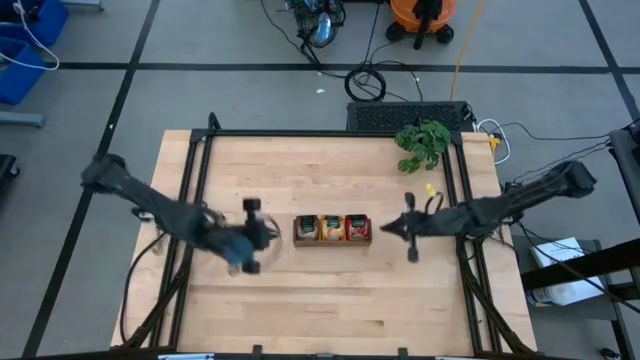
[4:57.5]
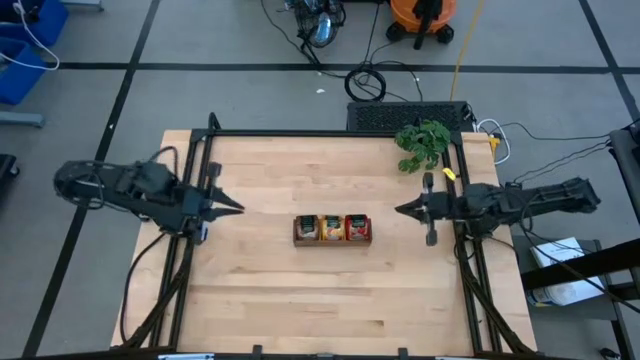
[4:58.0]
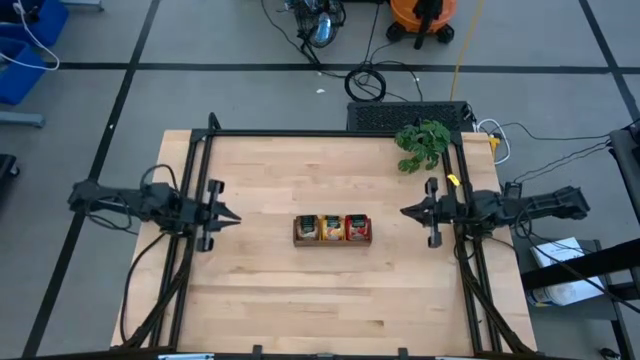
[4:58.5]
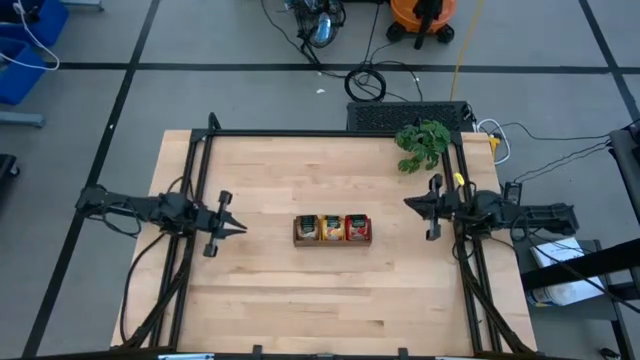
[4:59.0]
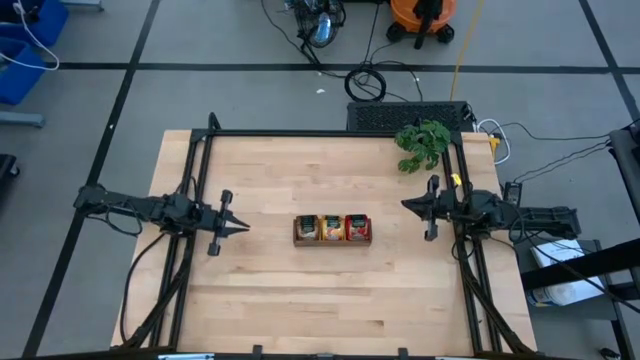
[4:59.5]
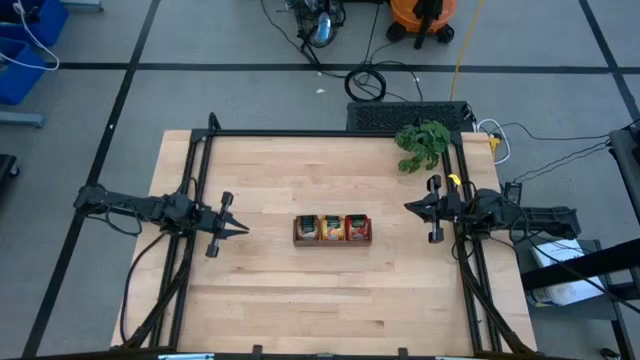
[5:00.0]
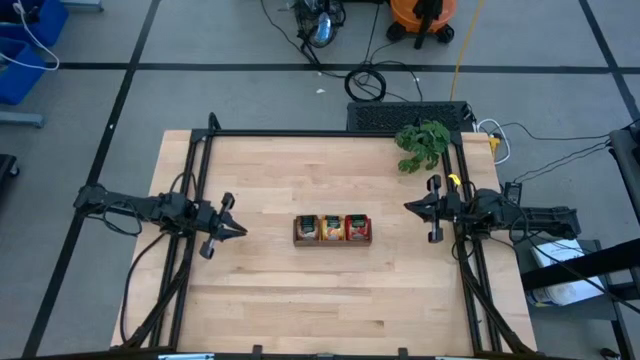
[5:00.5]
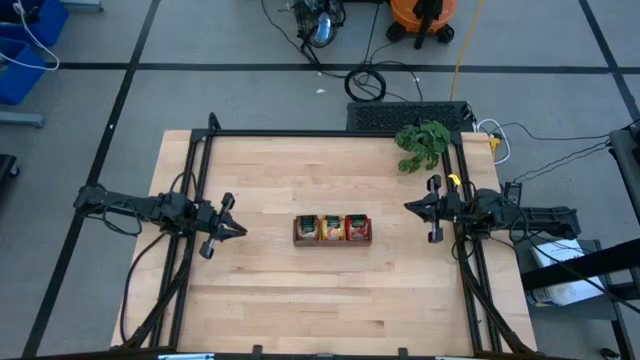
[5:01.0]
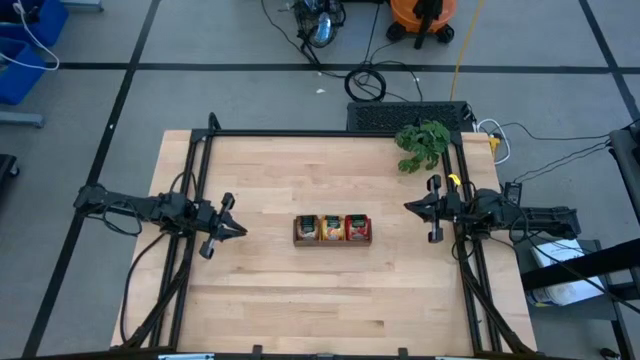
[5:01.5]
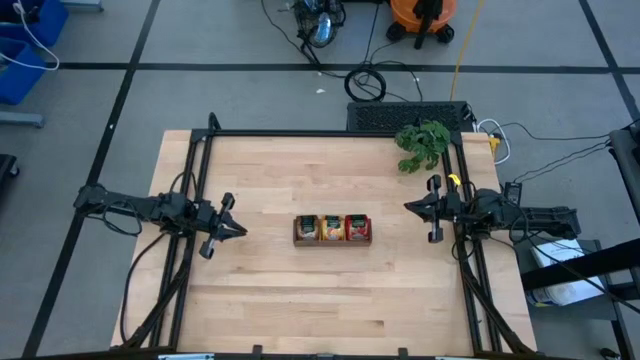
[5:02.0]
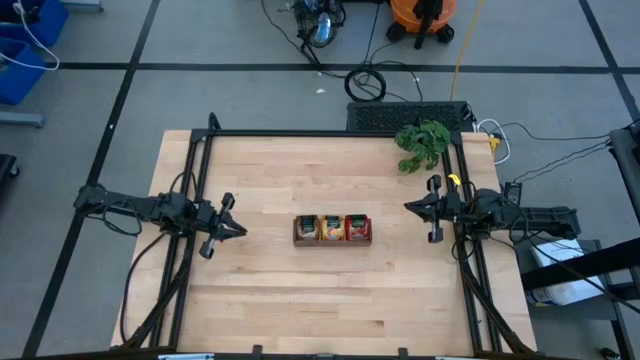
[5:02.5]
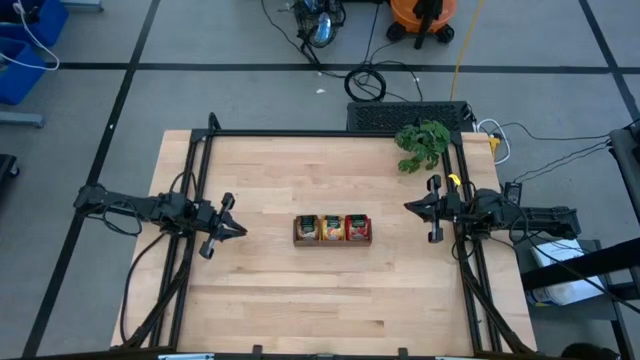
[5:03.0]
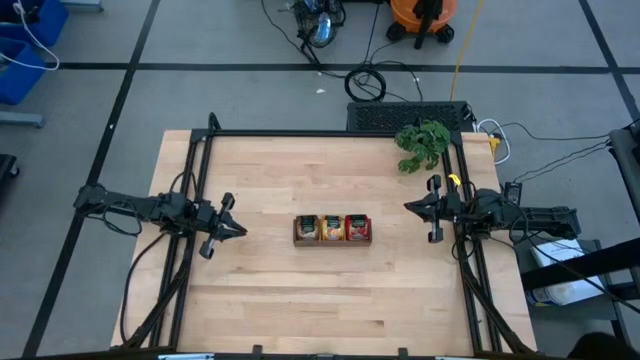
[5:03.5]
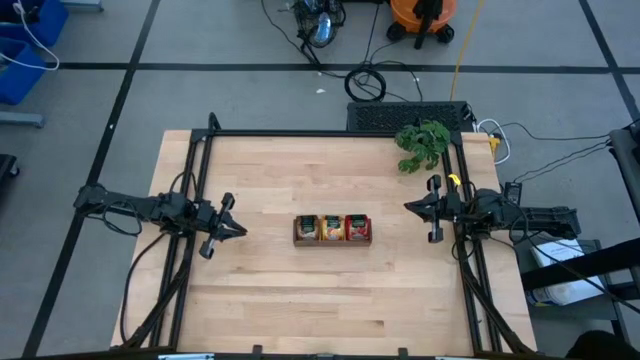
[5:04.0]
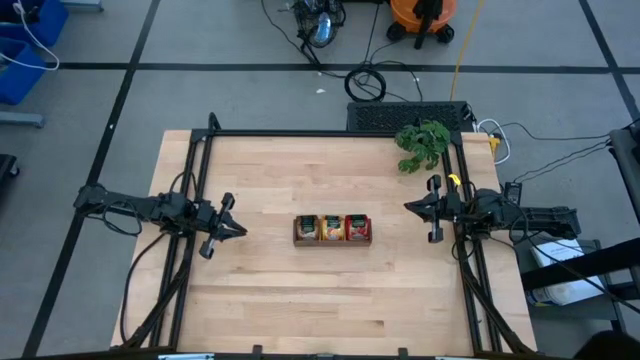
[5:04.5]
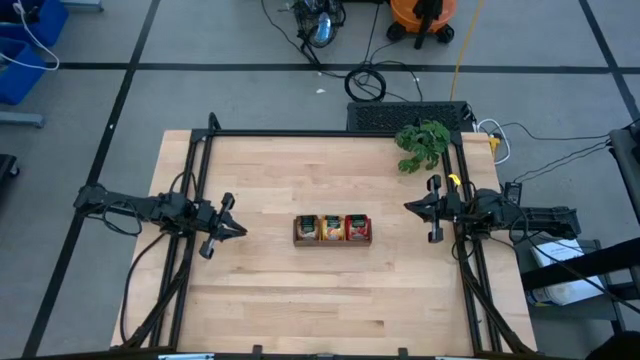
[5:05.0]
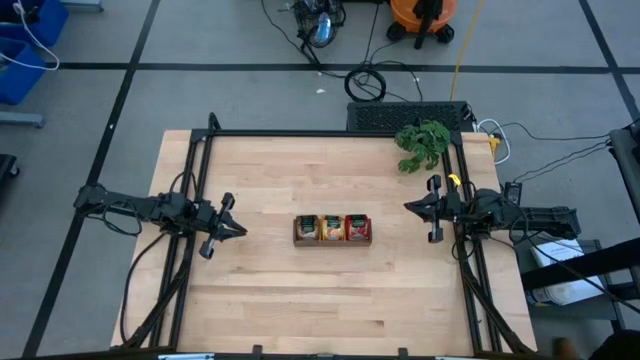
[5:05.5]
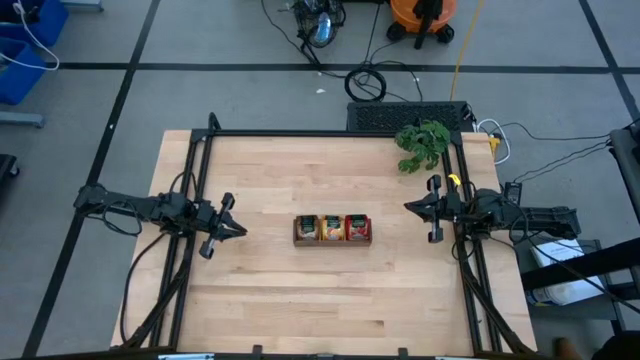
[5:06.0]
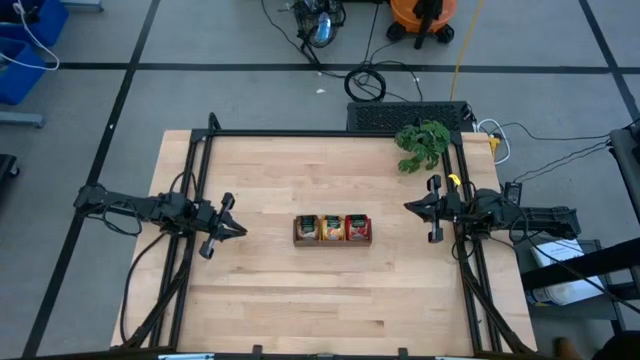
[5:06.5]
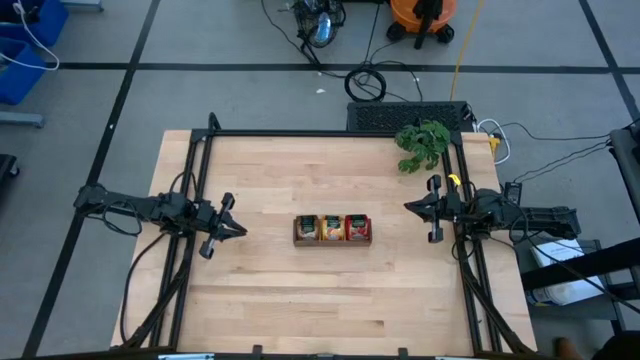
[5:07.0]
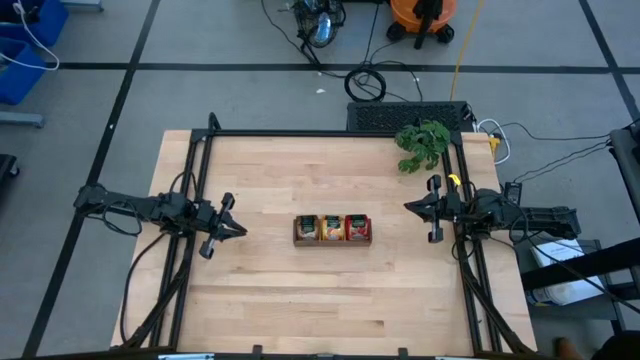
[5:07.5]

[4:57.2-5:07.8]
Task: Pick & Place Tea
Return to Home Position

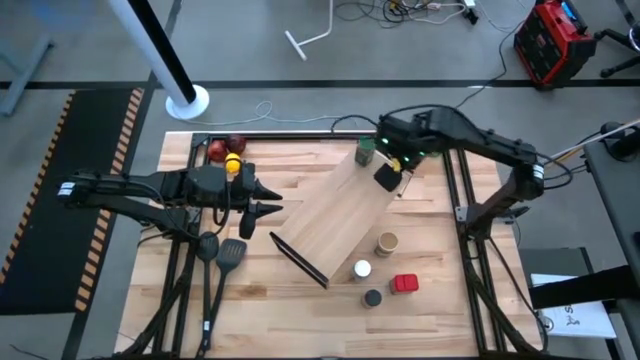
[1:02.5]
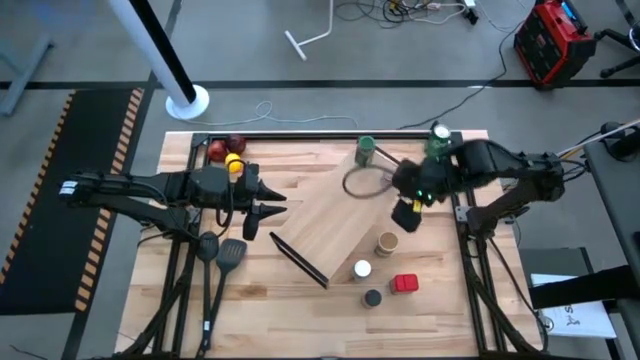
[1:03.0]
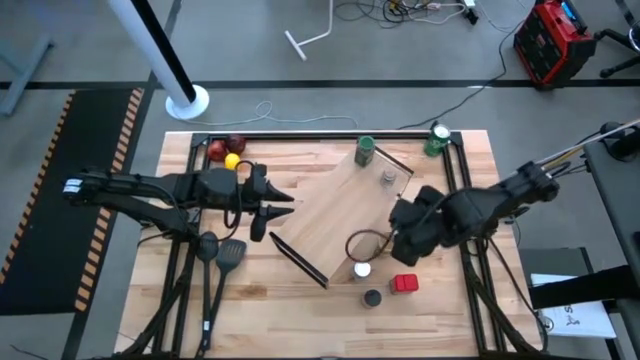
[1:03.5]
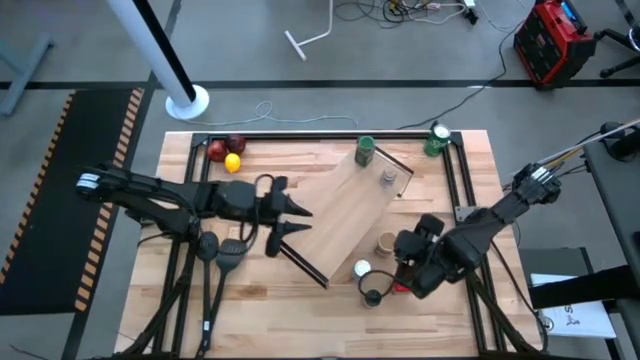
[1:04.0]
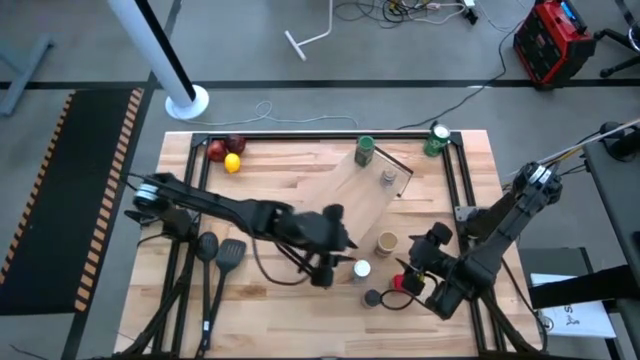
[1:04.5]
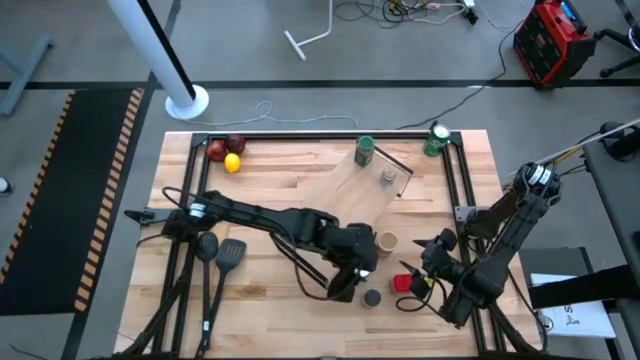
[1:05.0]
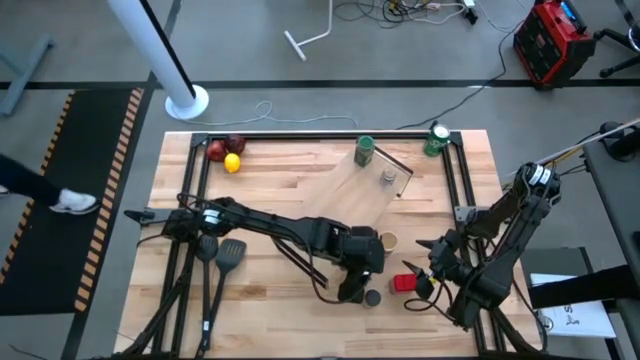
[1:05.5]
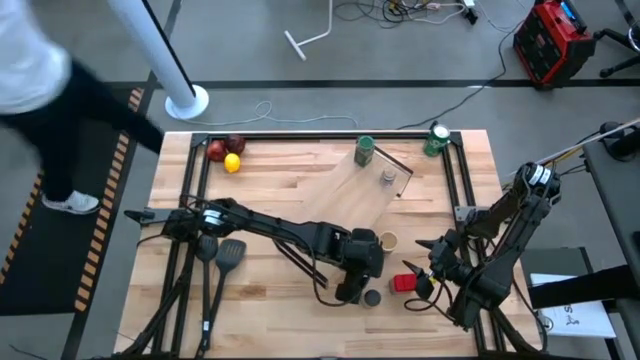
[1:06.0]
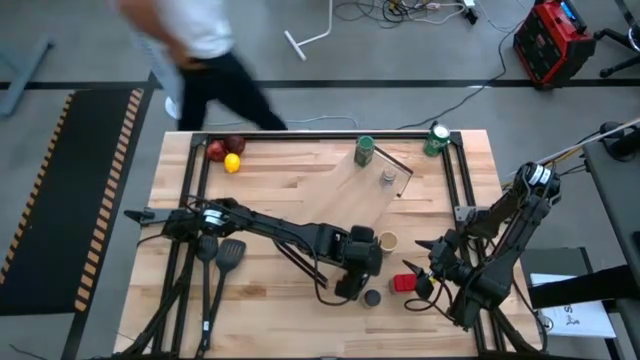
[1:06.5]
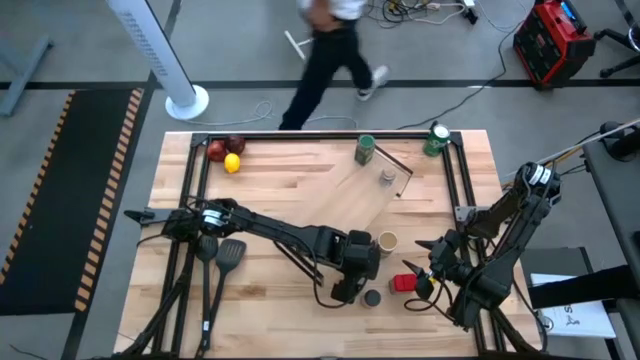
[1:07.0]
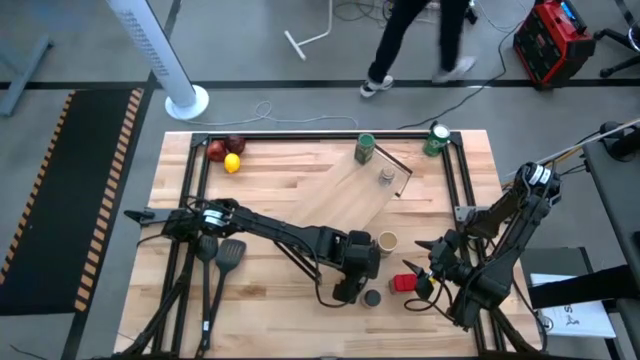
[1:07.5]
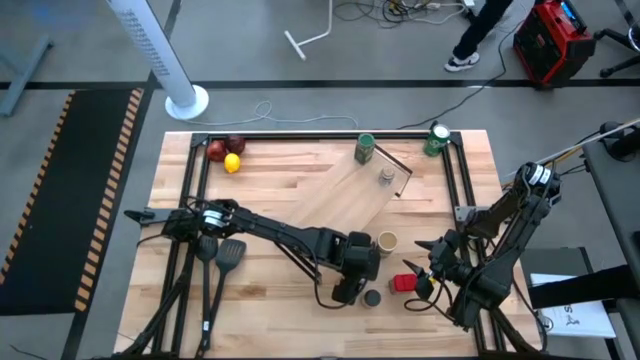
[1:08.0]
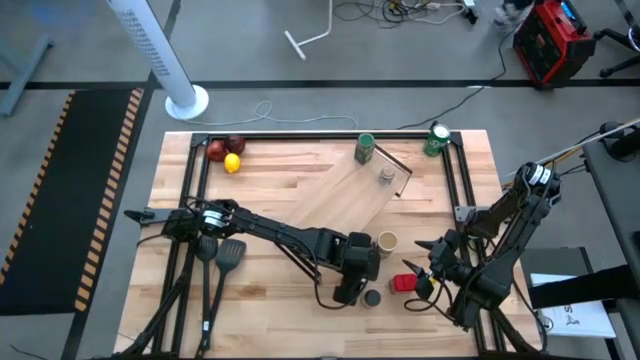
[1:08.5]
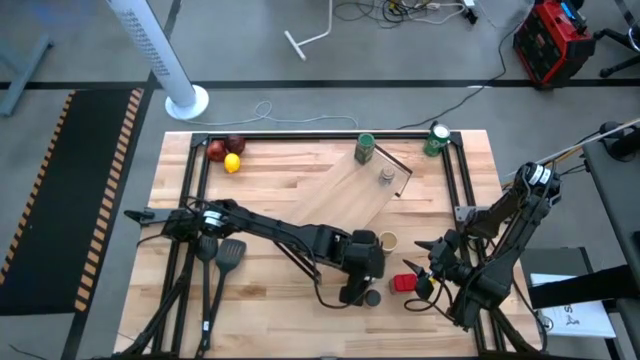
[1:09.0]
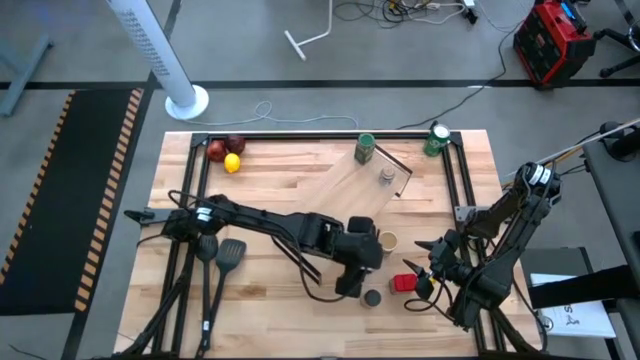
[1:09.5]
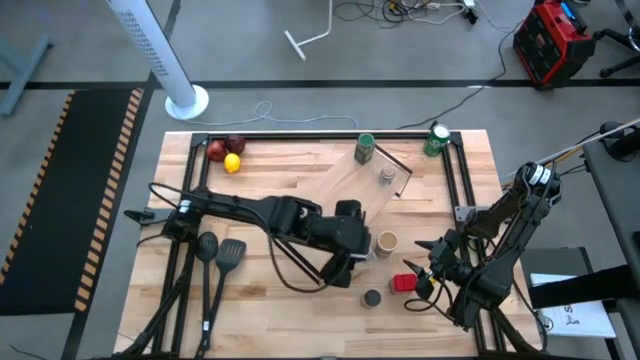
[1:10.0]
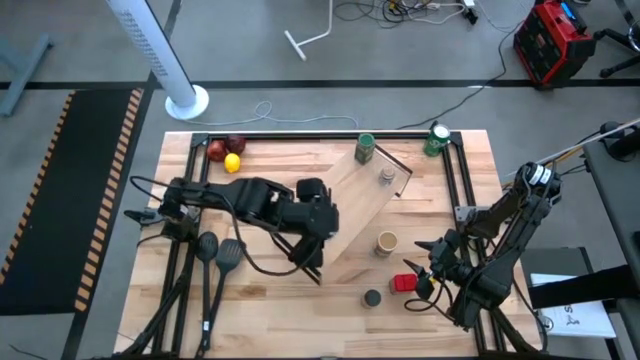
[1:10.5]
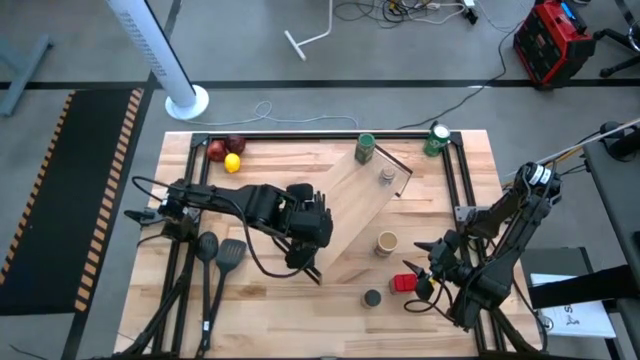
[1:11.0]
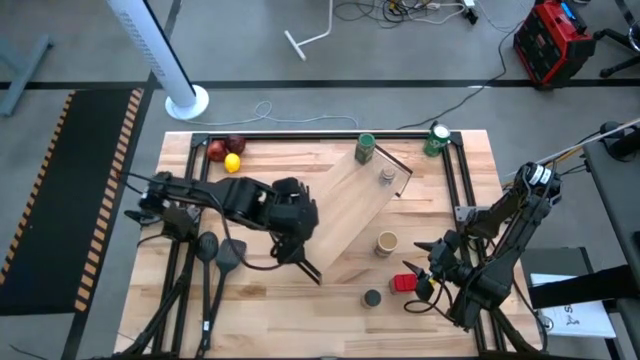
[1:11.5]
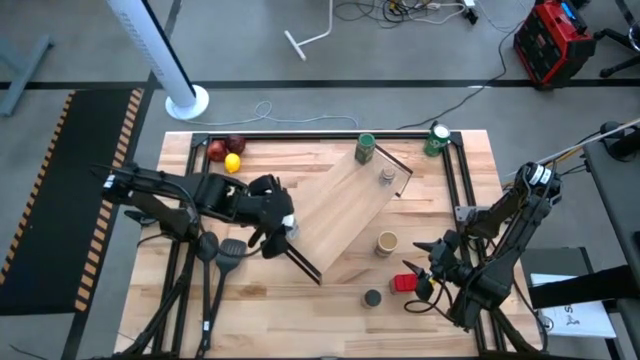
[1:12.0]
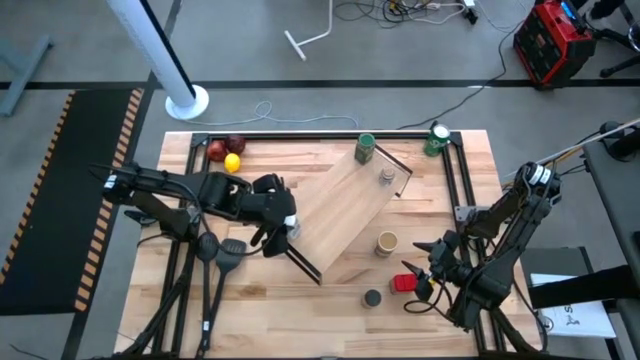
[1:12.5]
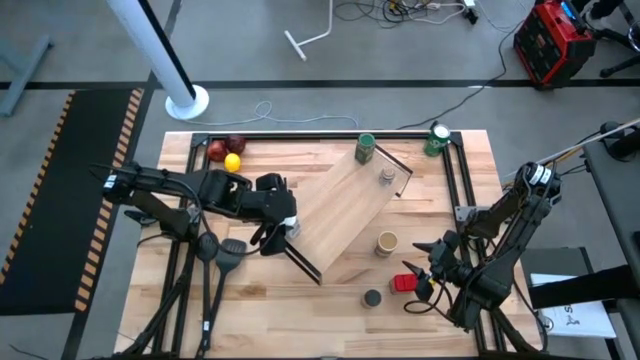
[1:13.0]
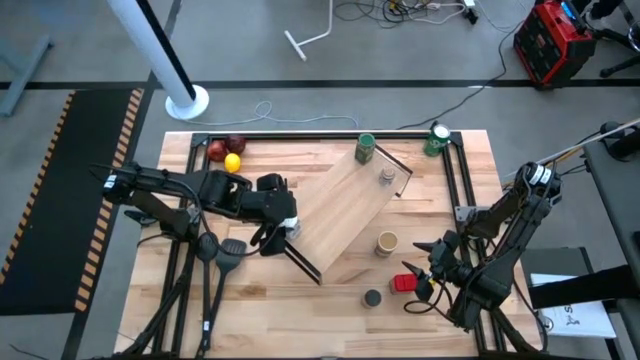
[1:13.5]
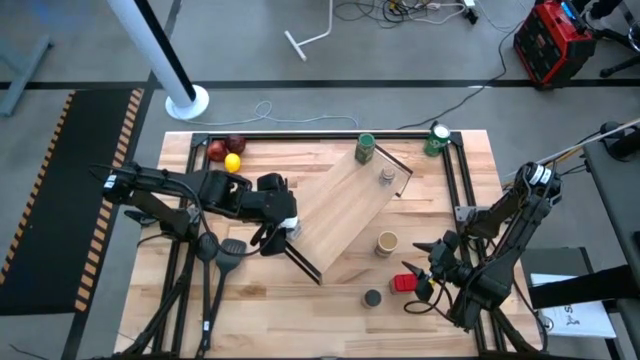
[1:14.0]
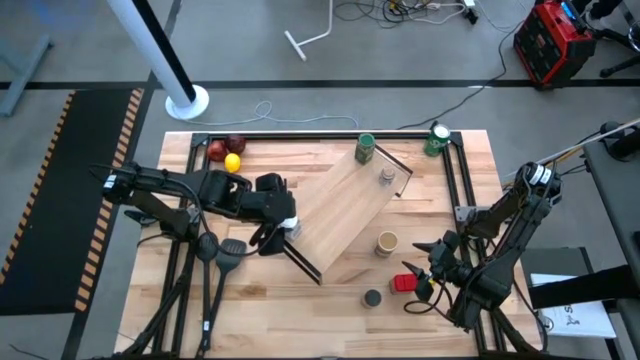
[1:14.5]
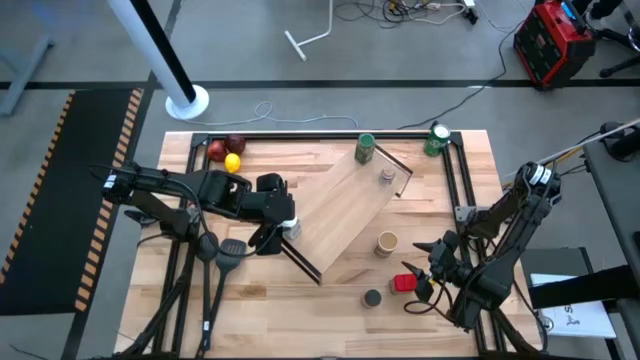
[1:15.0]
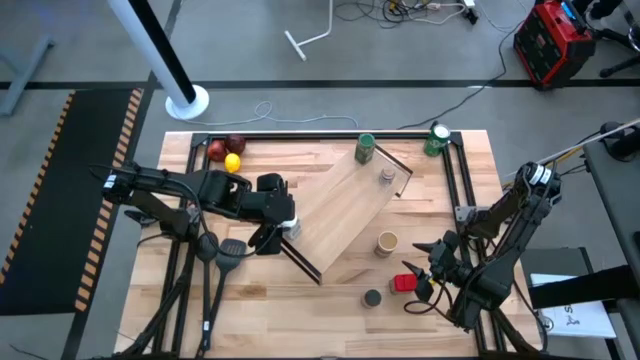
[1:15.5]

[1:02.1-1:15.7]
Task: Shelf spices
Put the white seasoning bottle on the shelf
